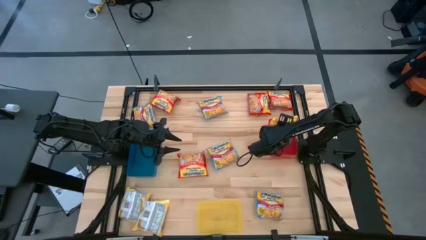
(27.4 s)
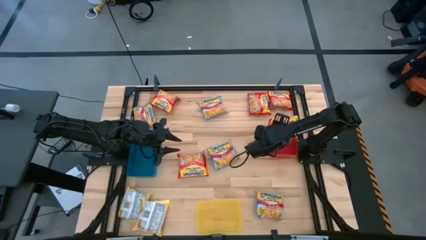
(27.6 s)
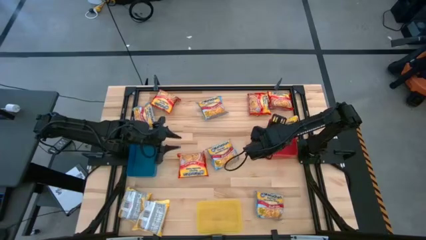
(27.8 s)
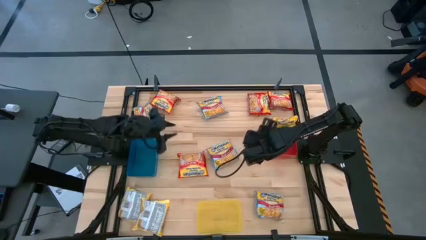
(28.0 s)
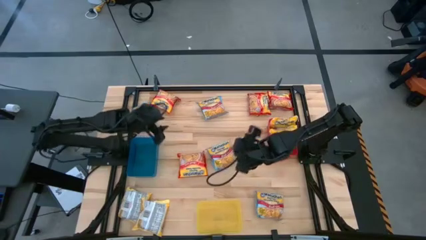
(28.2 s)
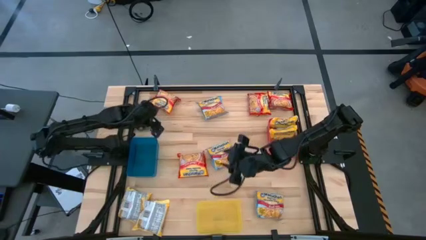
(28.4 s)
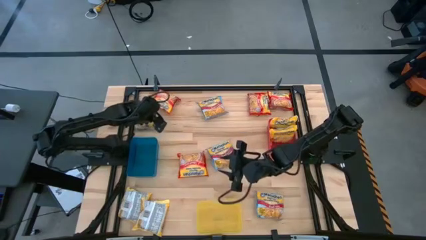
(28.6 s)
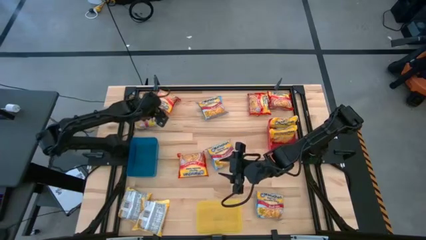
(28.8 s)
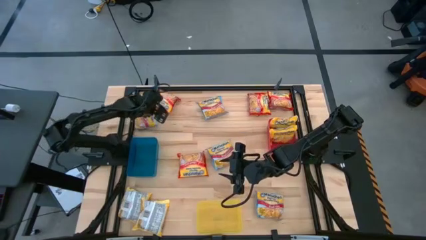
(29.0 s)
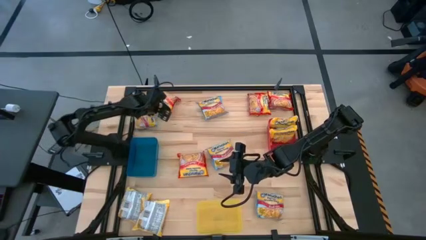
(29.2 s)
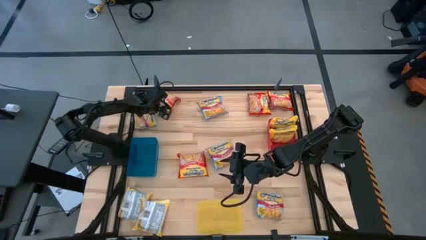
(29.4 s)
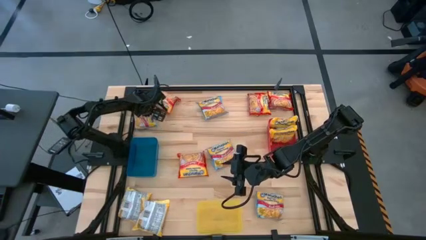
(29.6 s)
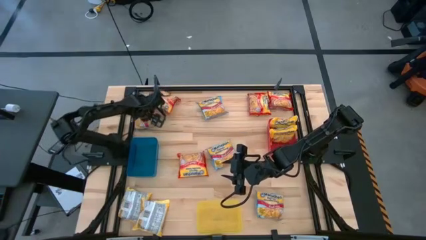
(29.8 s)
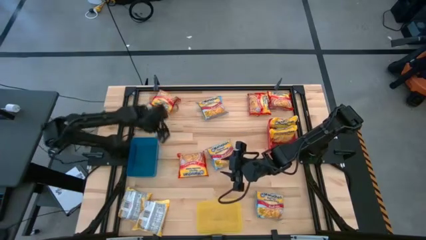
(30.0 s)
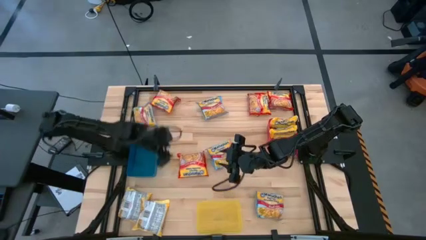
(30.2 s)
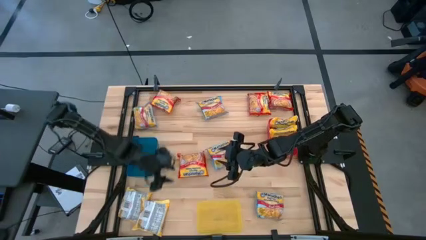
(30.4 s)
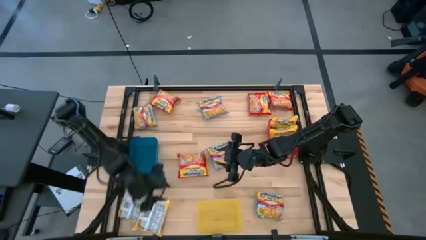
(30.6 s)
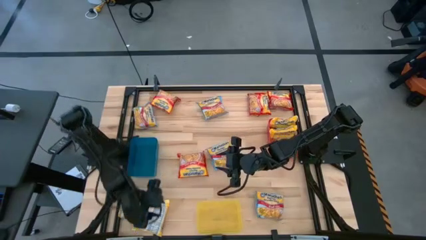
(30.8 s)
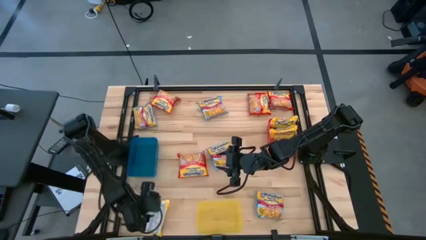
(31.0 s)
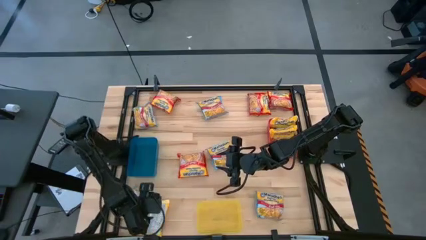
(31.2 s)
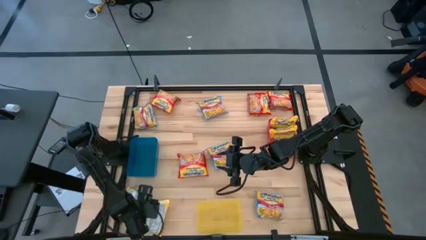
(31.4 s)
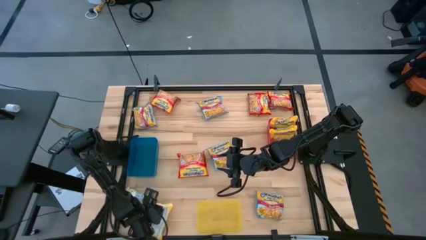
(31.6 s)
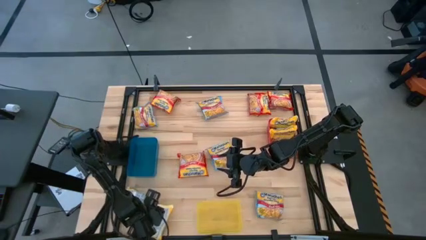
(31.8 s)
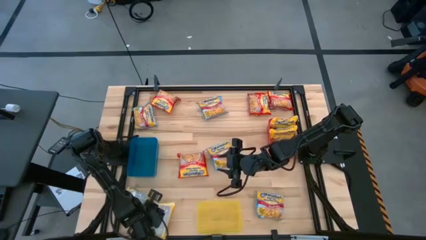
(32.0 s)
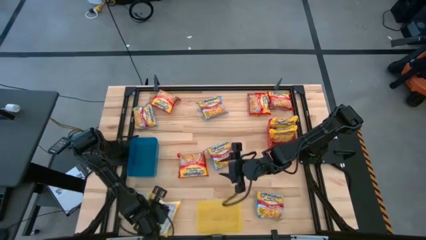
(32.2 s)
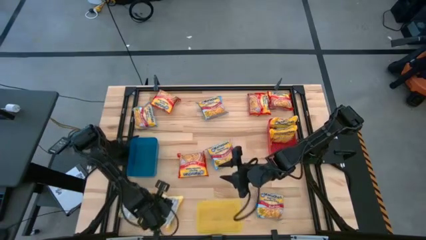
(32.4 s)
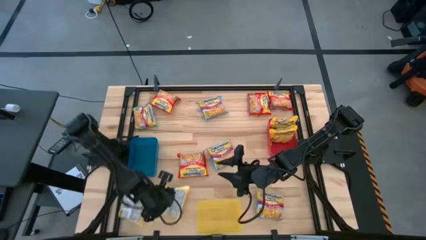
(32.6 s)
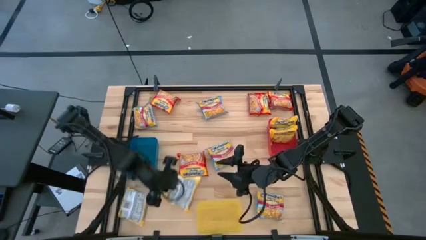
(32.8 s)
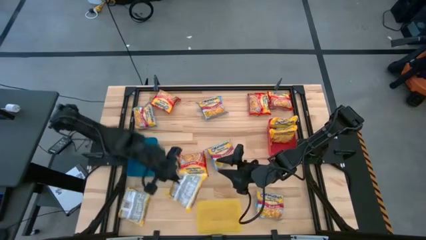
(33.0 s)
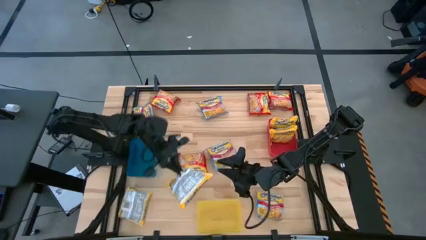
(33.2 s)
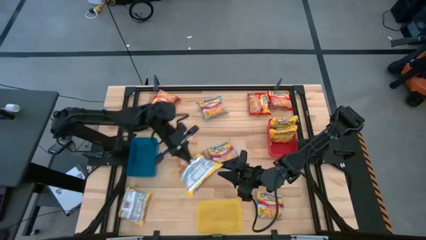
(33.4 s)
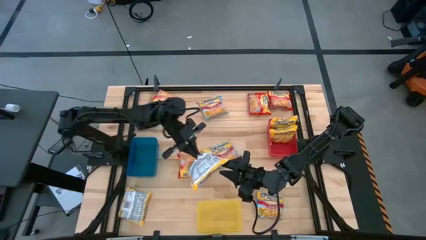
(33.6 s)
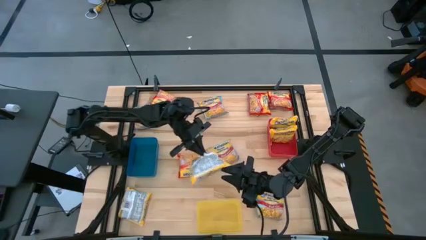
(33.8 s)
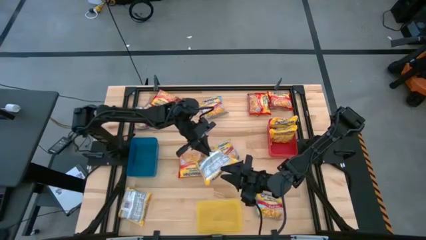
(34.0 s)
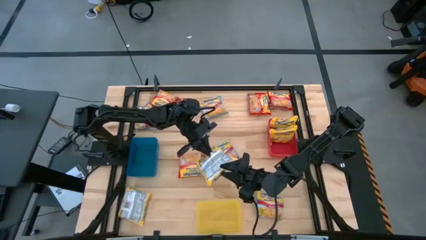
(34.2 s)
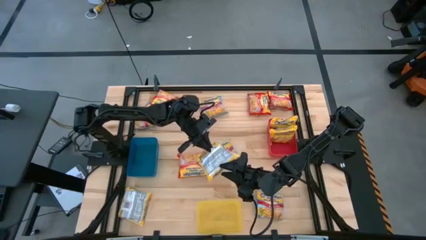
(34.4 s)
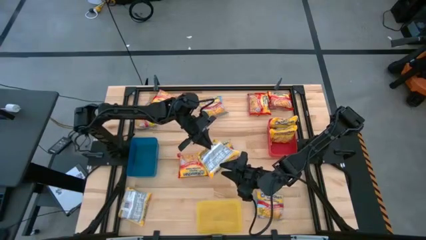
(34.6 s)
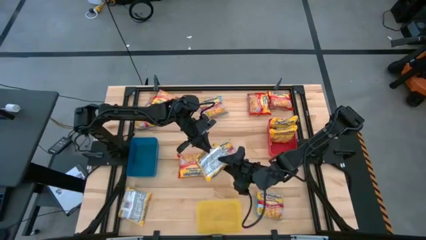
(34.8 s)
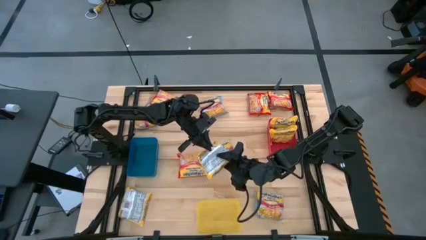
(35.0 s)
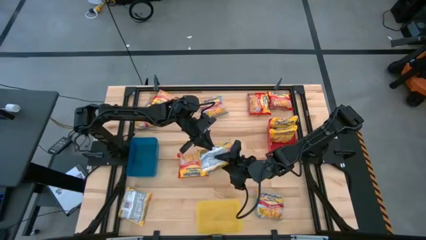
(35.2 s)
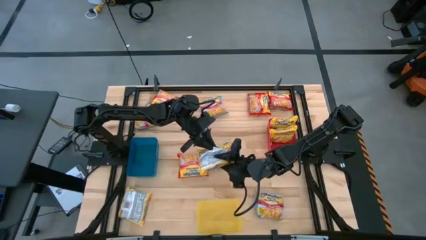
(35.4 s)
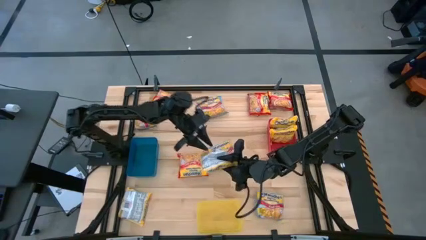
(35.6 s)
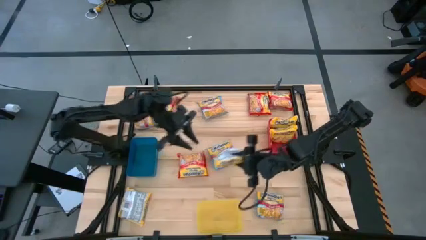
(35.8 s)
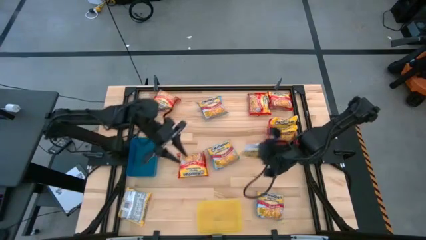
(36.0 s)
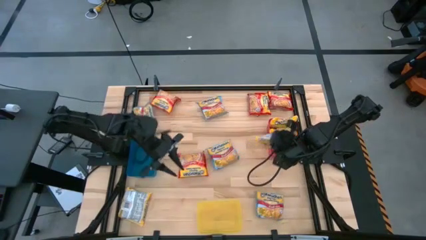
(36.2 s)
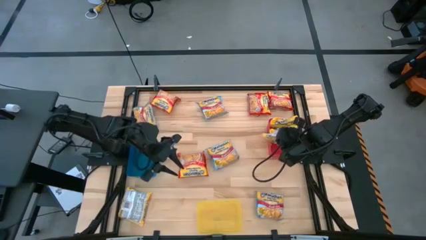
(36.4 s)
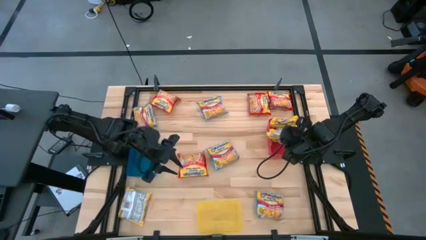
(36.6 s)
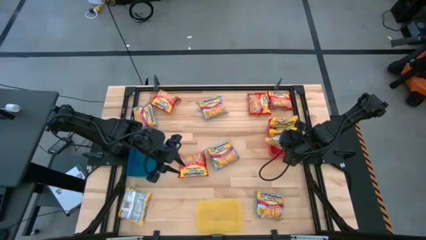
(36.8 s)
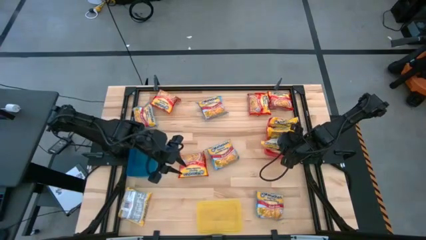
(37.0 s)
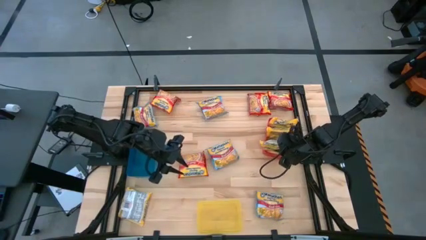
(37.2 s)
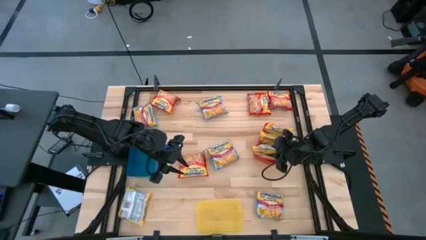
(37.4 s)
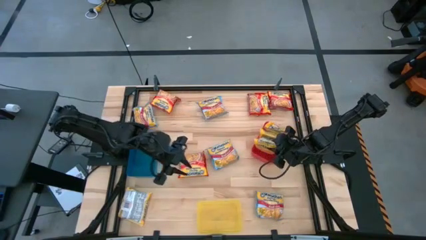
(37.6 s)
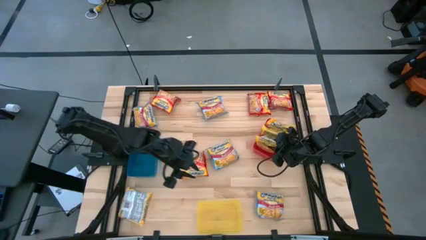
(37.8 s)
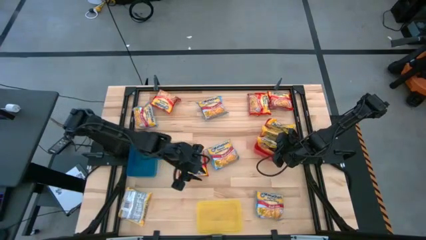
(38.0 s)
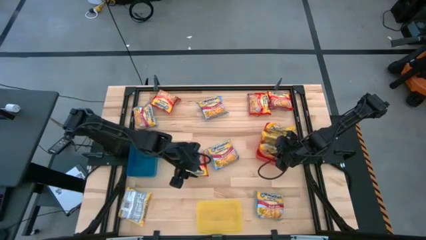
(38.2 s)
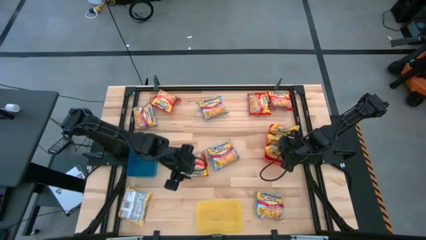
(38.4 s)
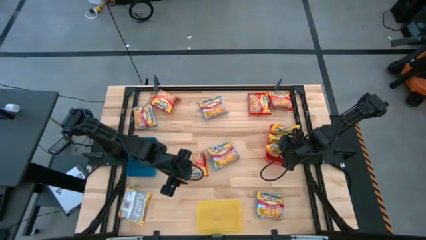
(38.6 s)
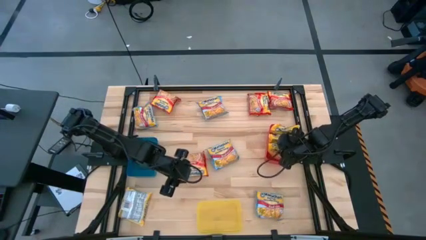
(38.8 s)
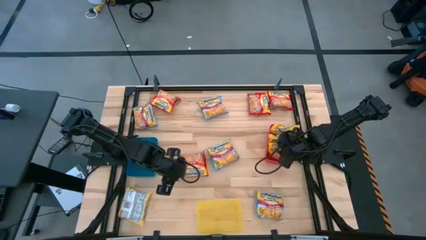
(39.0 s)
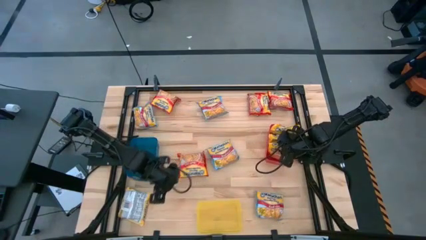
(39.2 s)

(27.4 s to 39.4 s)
Task: Sort Maruchan noodles
Put the yellow noodle pack into the red bin
